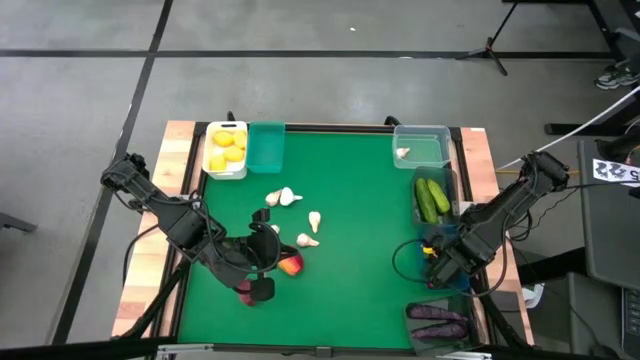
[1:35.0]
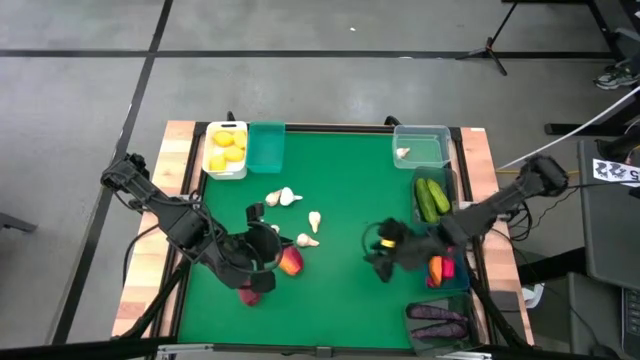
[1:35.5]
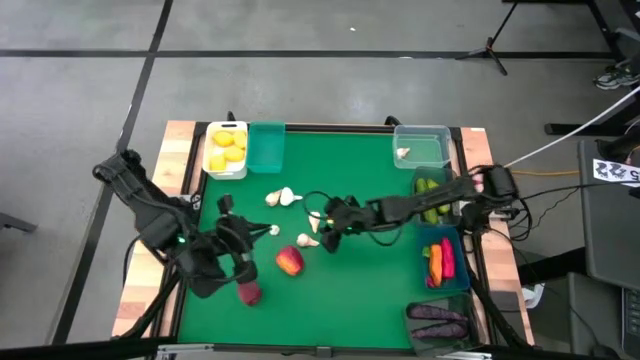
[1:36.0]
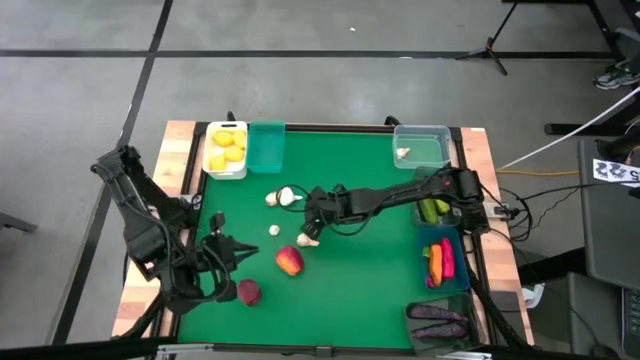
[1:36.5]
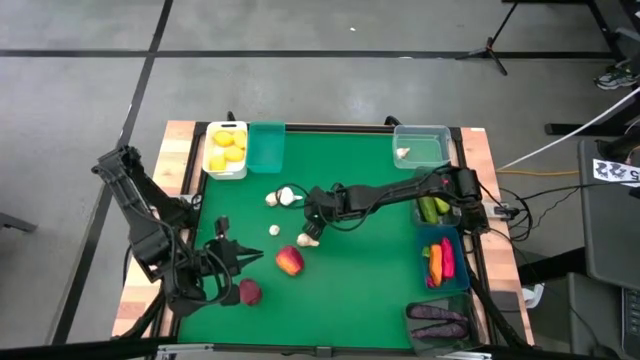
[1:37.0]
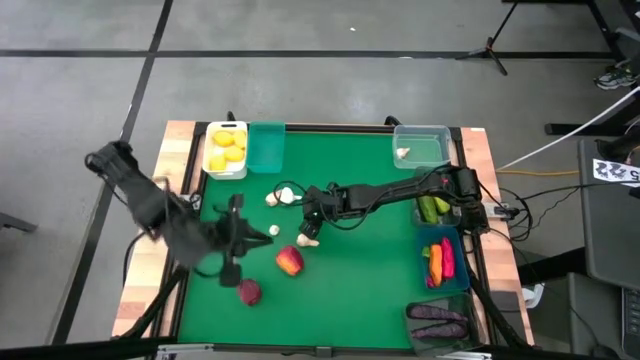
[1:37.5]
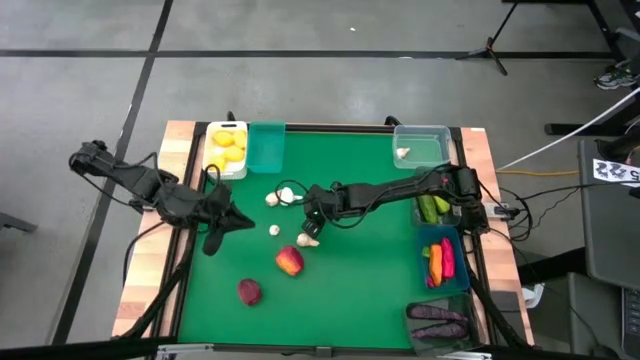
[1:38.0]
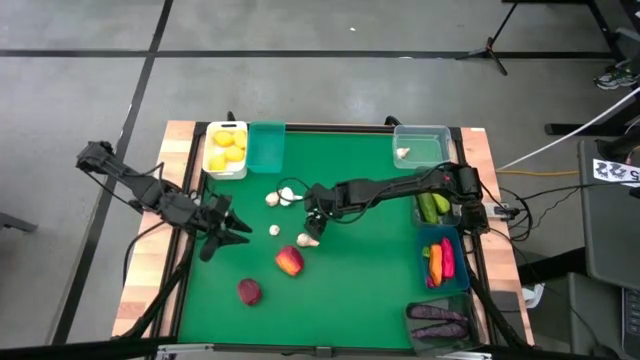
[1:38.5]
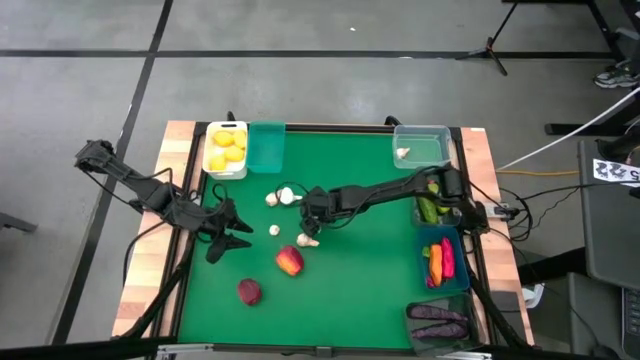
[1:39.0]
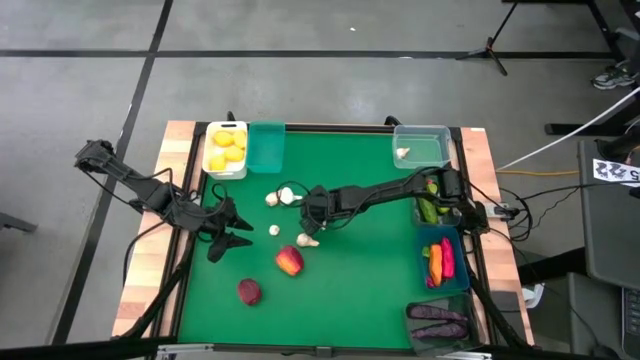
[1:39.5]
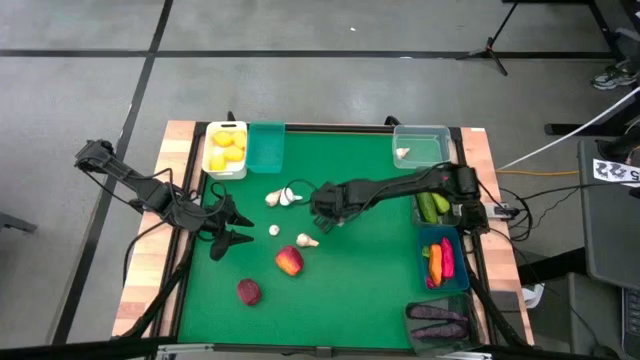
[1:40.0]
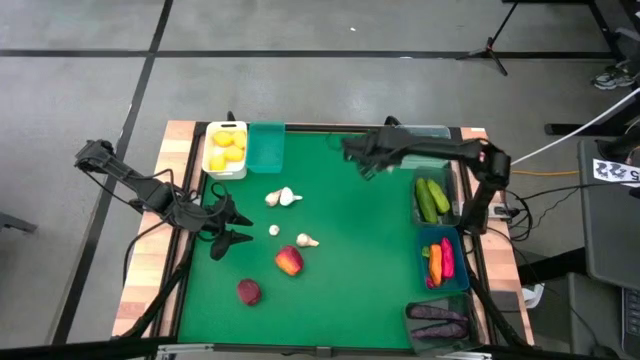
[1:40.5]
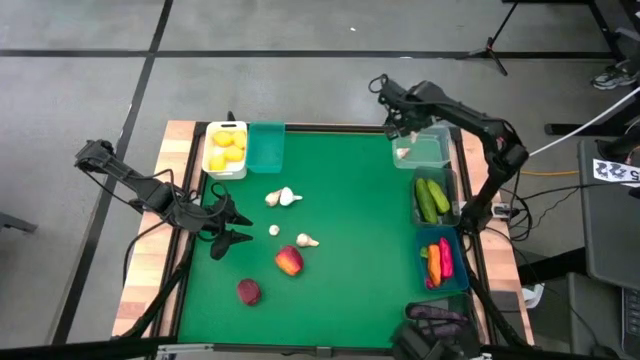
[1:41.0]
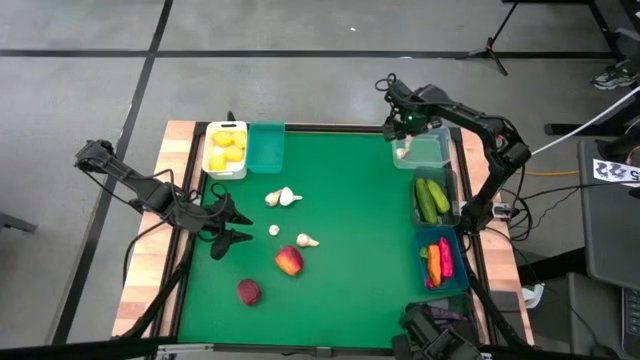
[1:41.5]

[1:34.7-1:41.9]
Task: Sort produce into baskets
Put the white garlic into the transparent bin

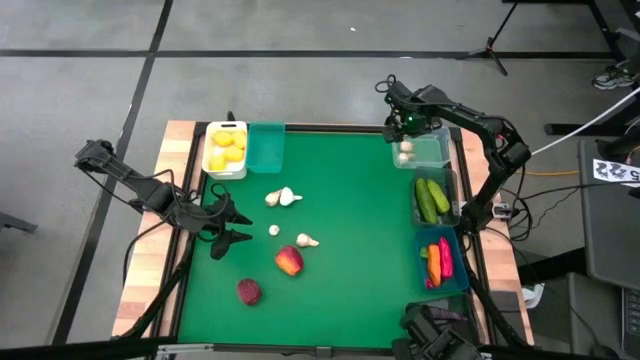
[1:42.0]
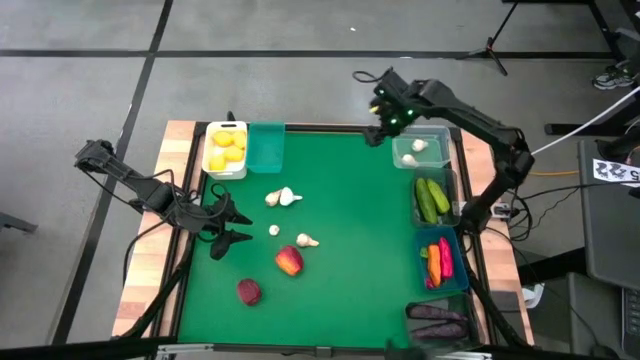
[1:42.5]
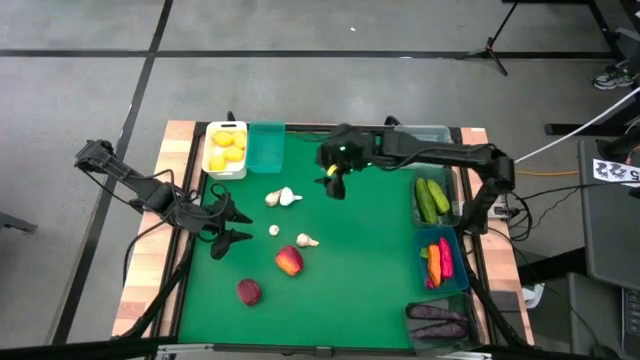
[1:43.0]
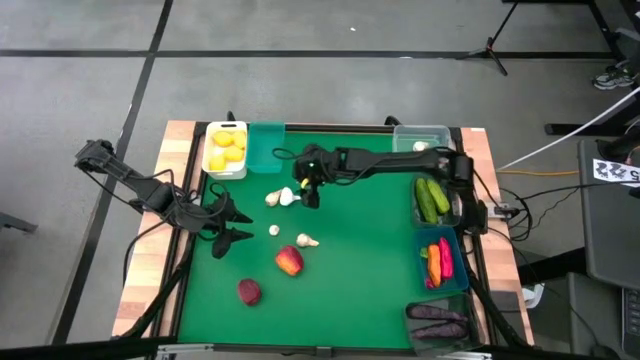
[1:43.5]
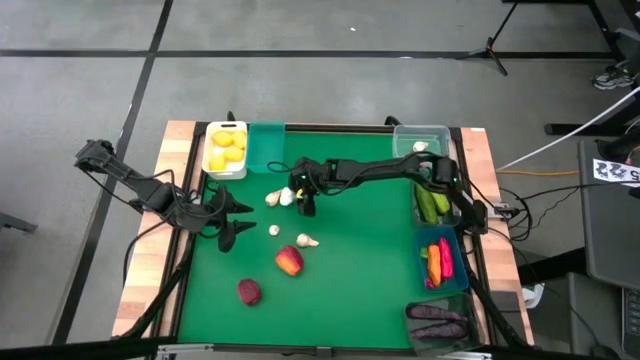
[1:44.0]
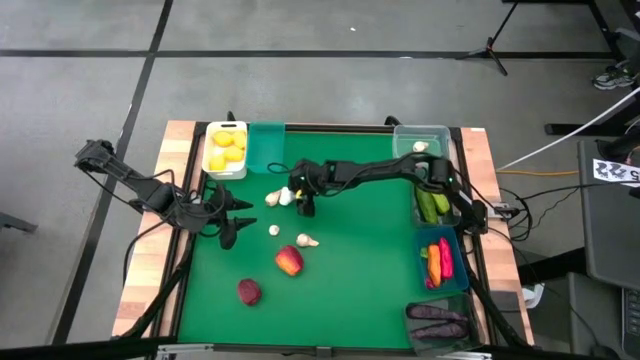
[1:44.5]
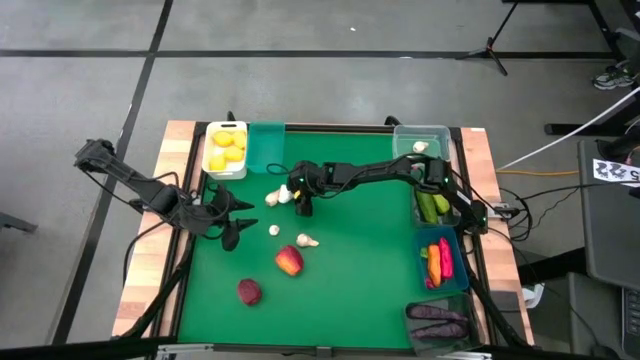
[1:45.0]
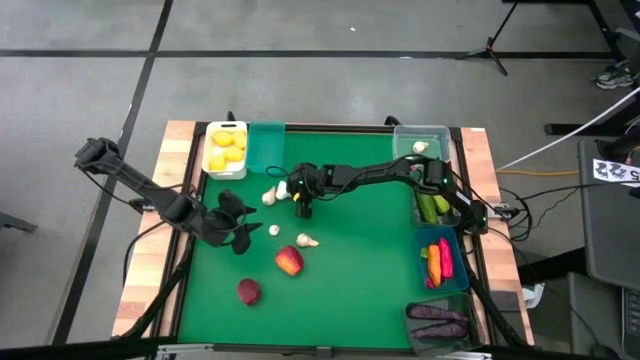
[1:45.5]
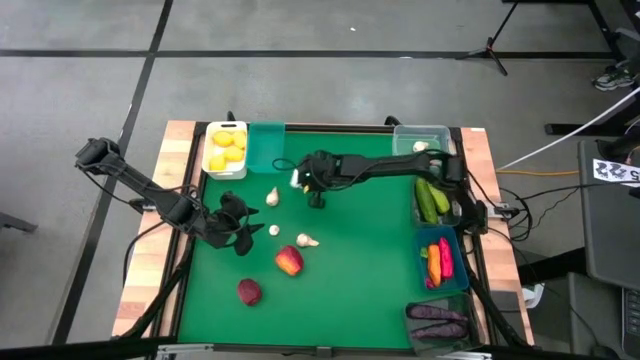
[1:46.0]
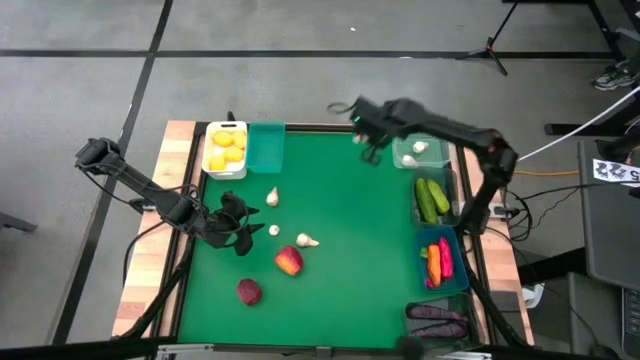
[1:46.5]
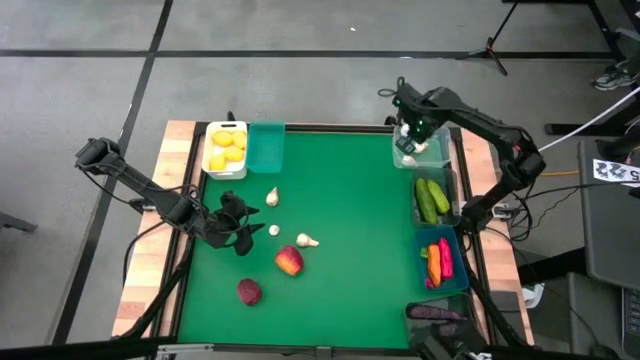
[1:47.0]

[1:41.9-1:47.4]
Put the white garlic into the transparent bin

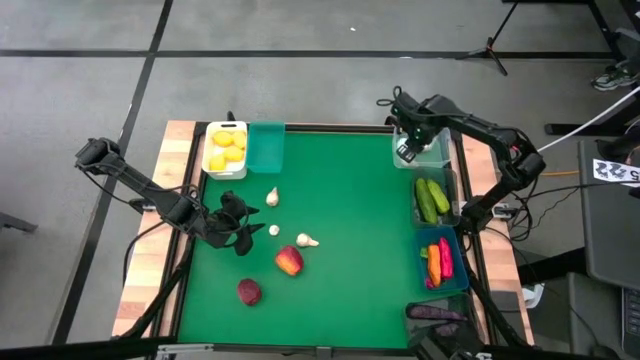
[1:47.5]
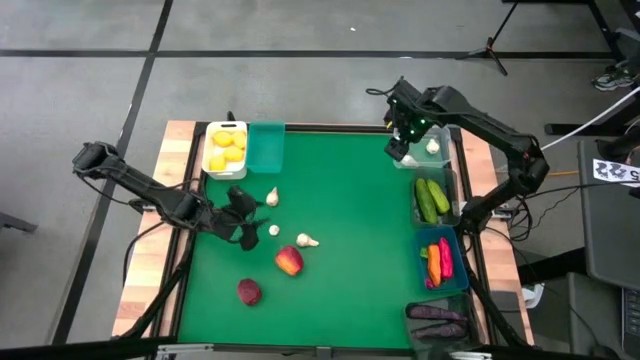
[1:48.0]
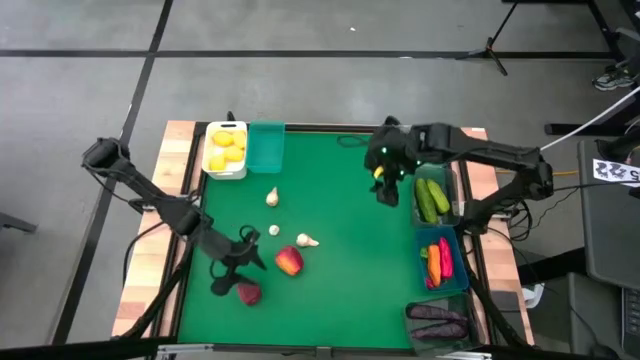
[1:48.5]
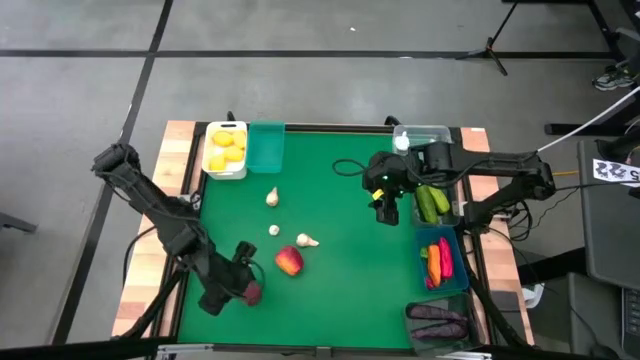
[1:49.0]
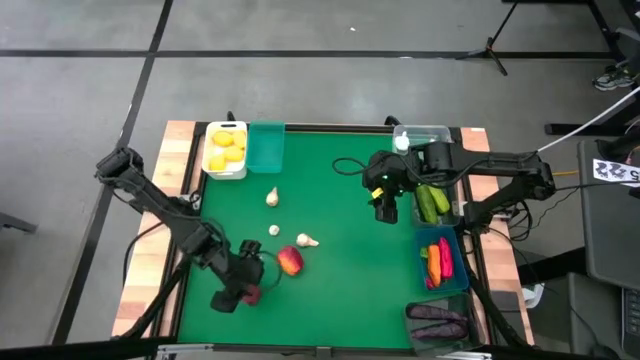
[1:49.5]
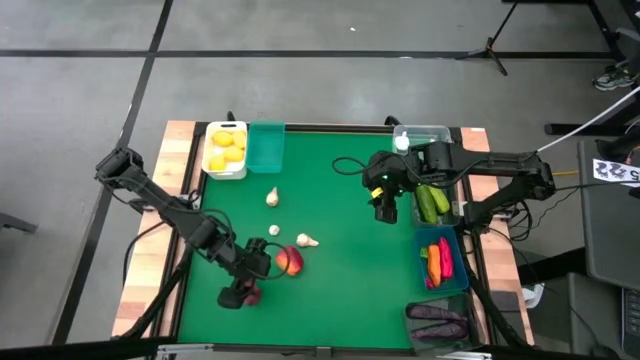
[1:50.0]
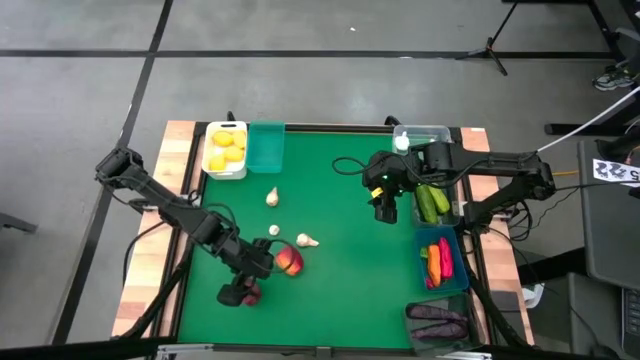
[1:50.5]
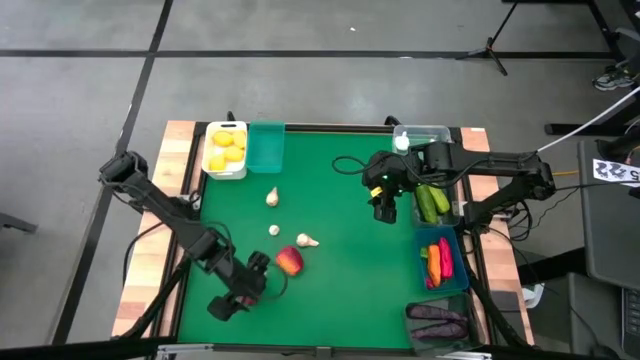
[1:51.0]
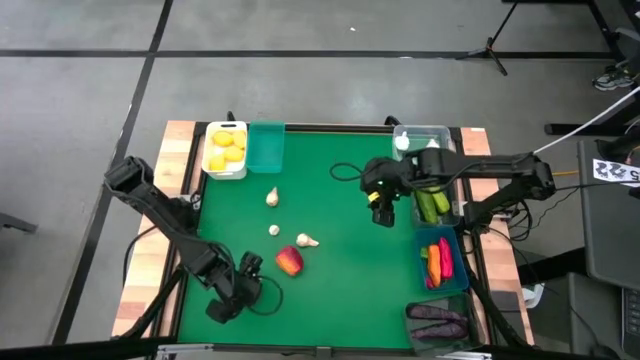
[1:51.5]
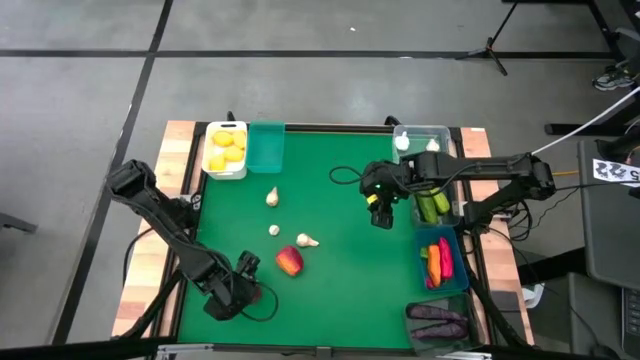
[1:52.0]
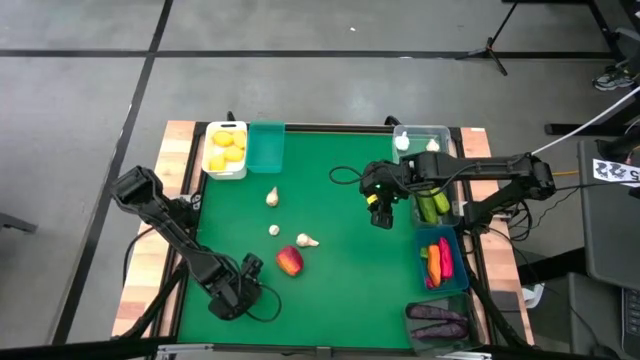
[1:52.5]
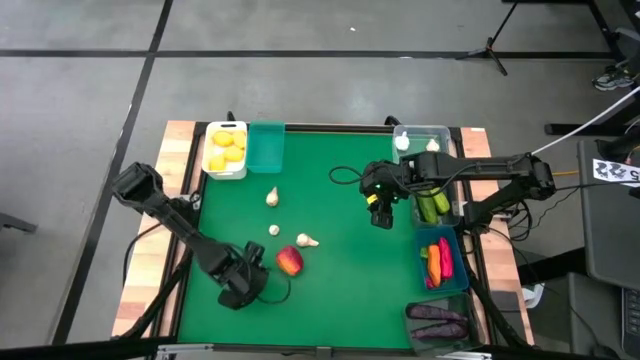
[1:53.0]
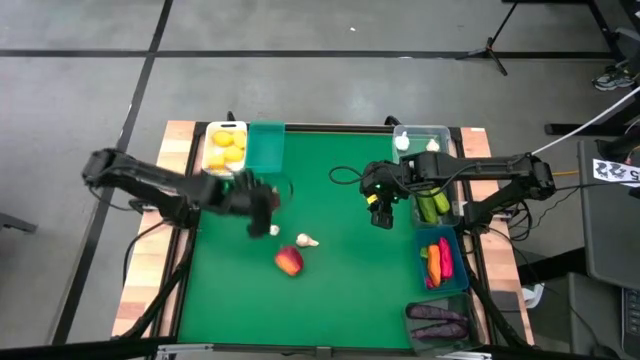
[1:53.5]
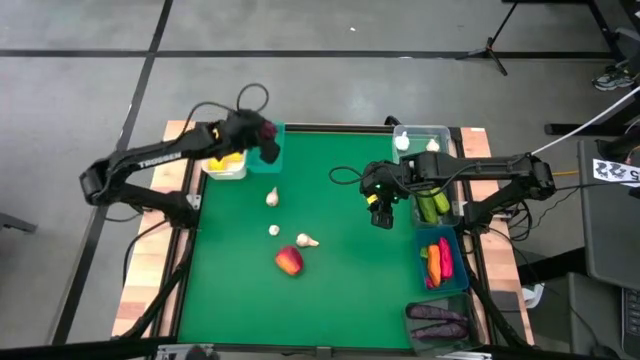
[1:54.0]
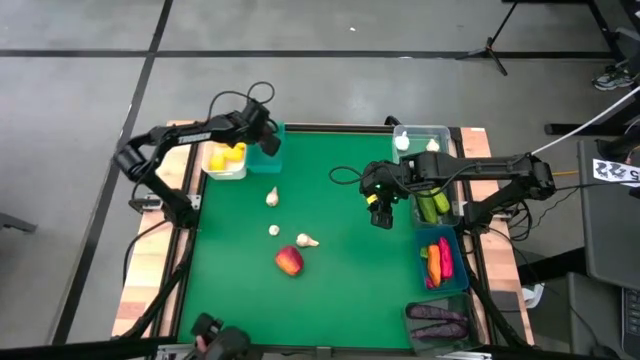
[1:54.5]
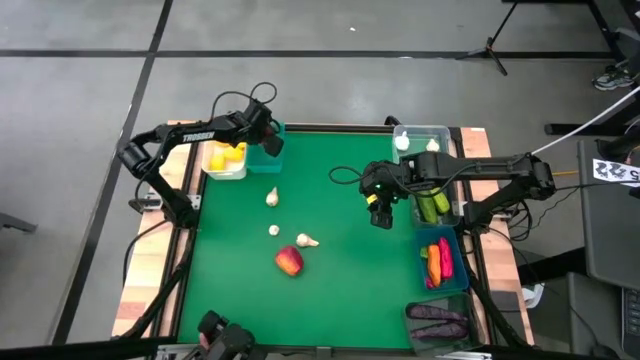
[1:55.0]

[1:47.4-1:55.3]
Put the red apple into the light blue bin
